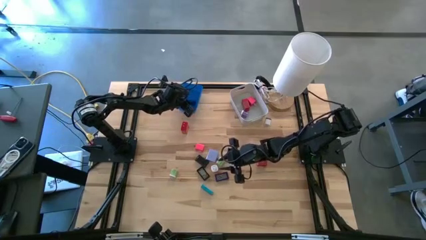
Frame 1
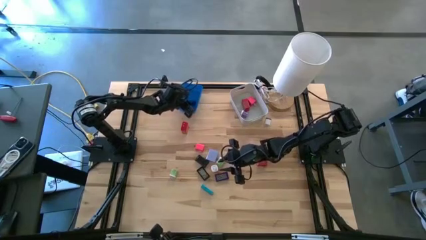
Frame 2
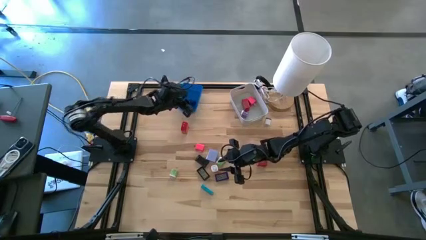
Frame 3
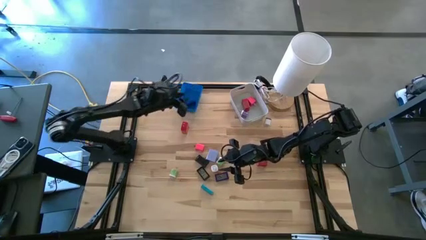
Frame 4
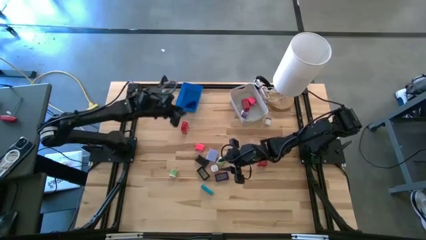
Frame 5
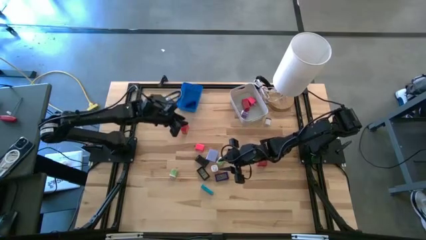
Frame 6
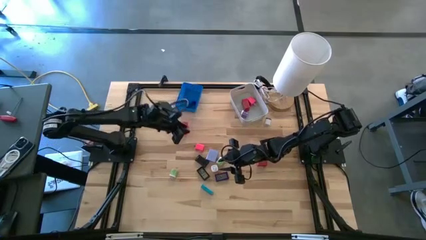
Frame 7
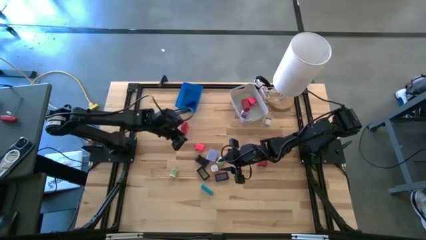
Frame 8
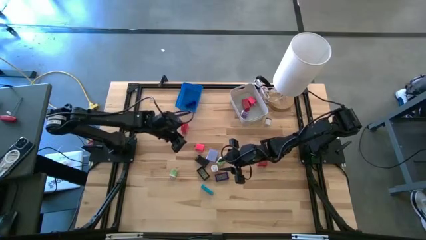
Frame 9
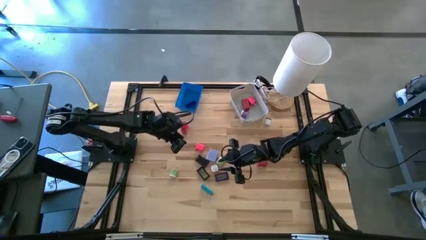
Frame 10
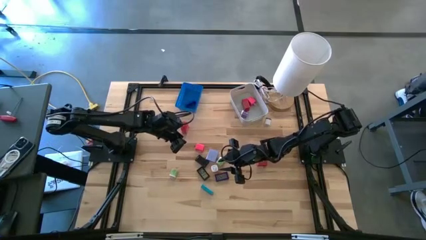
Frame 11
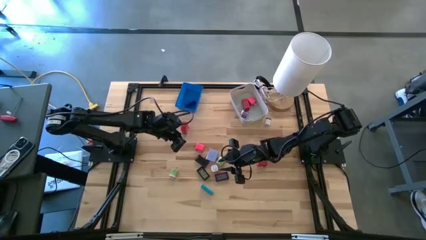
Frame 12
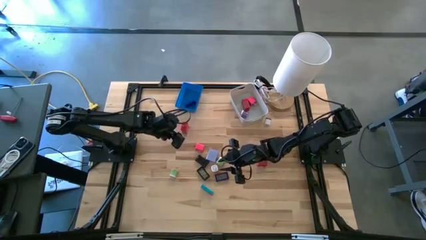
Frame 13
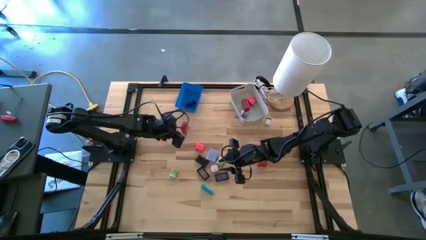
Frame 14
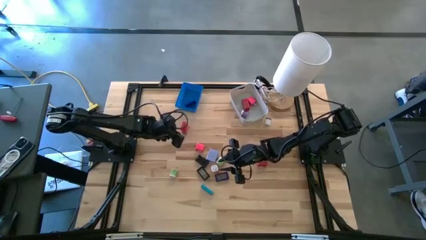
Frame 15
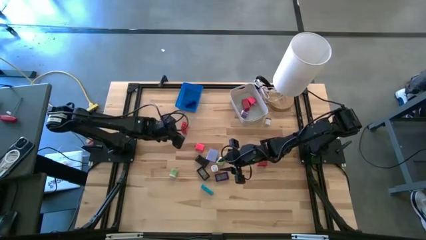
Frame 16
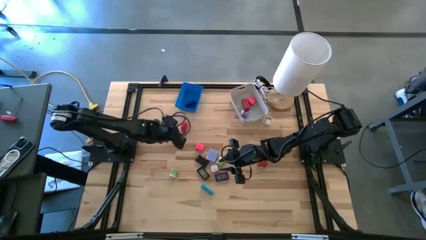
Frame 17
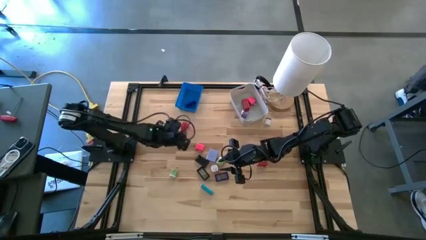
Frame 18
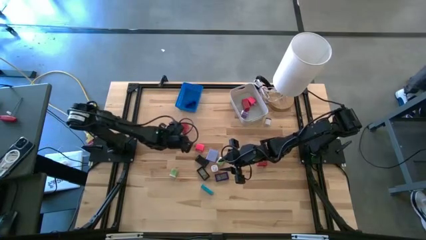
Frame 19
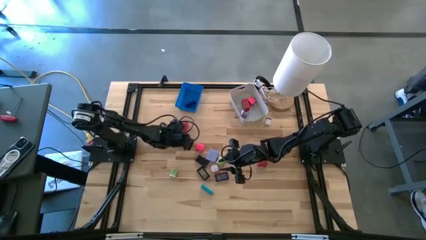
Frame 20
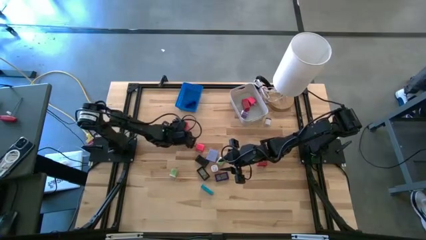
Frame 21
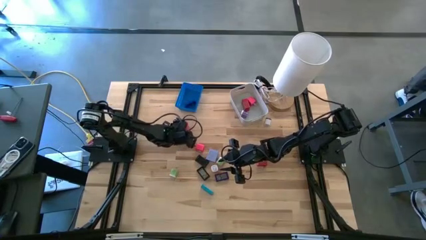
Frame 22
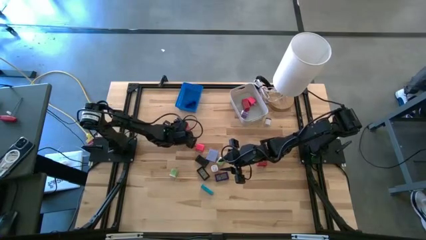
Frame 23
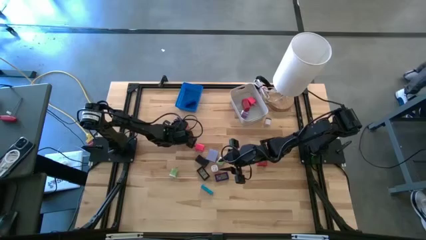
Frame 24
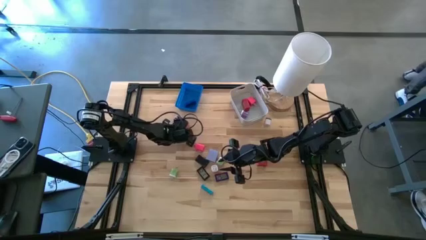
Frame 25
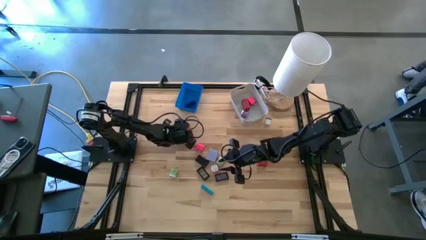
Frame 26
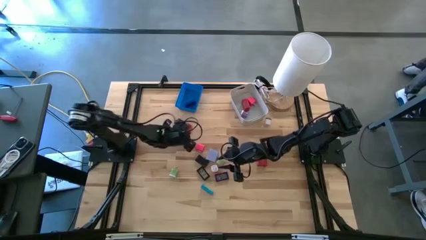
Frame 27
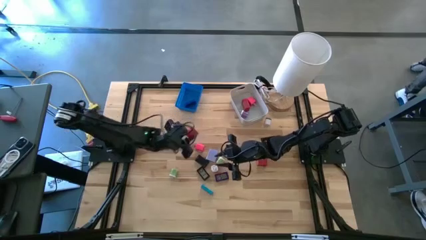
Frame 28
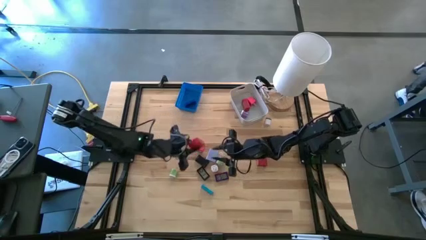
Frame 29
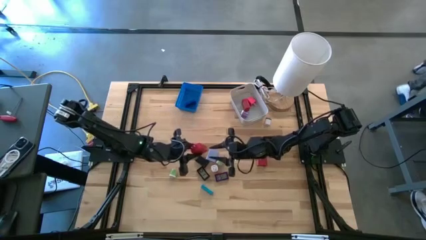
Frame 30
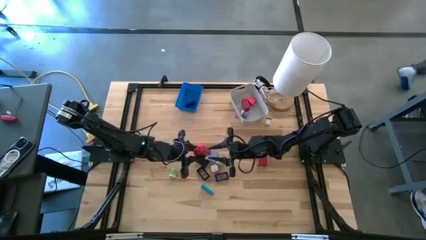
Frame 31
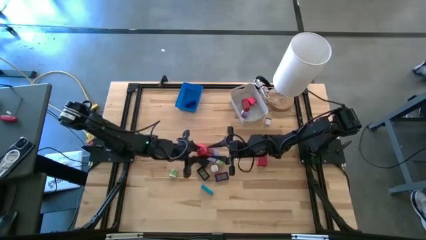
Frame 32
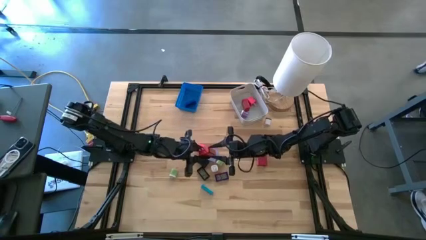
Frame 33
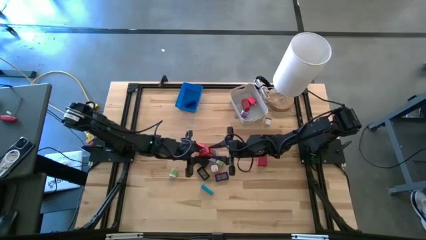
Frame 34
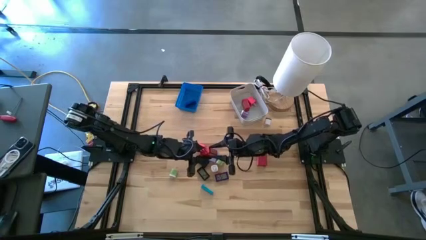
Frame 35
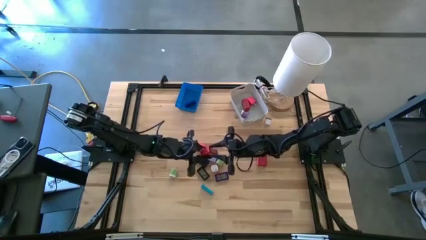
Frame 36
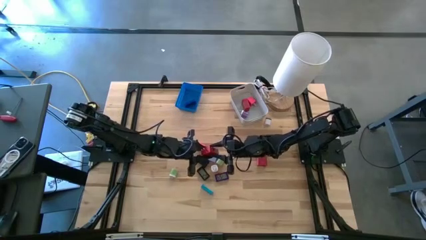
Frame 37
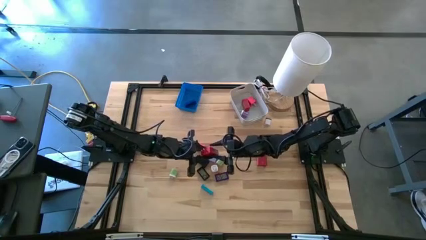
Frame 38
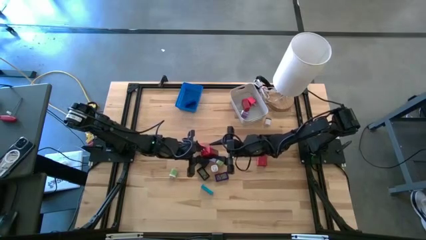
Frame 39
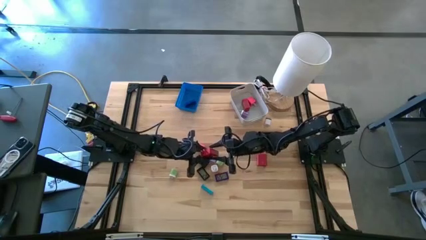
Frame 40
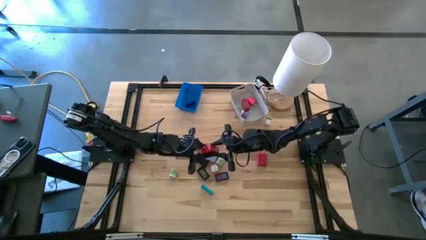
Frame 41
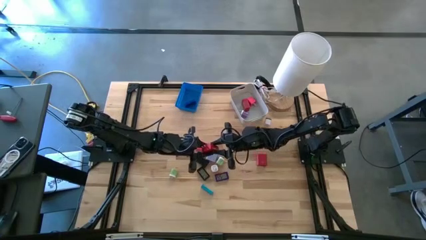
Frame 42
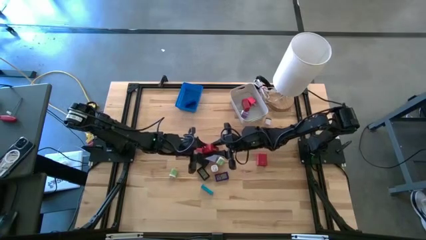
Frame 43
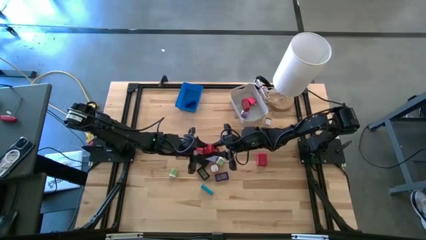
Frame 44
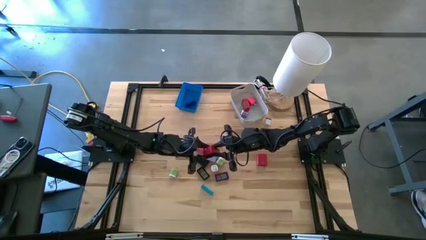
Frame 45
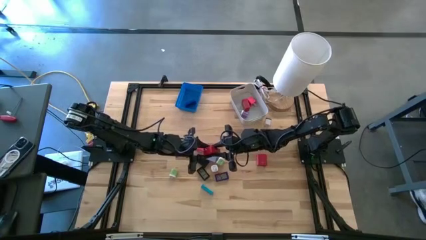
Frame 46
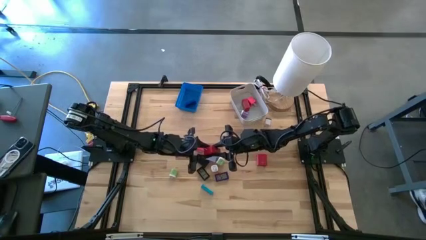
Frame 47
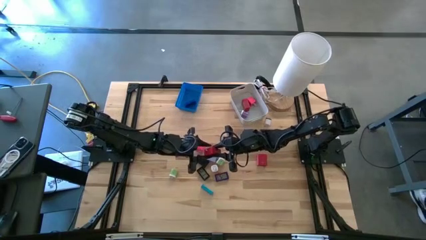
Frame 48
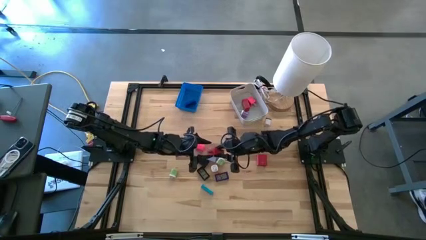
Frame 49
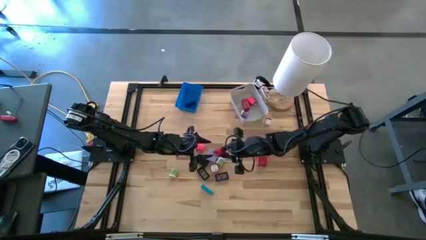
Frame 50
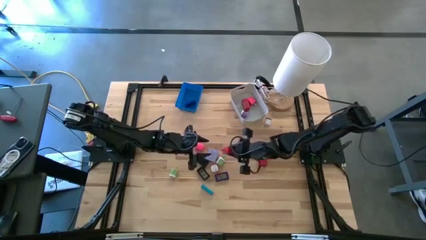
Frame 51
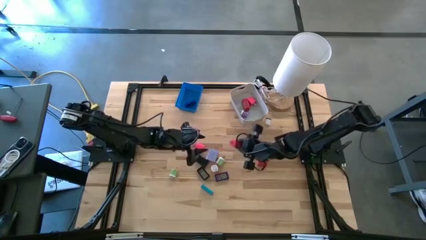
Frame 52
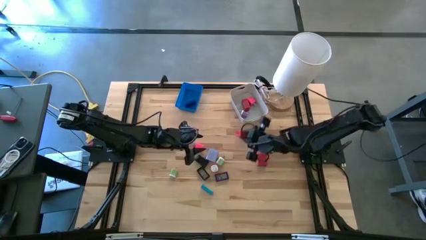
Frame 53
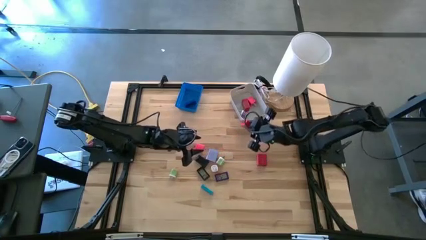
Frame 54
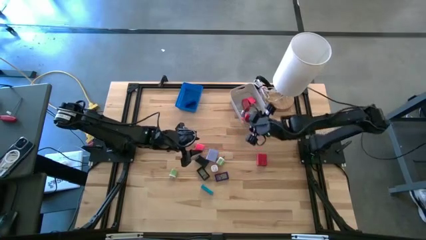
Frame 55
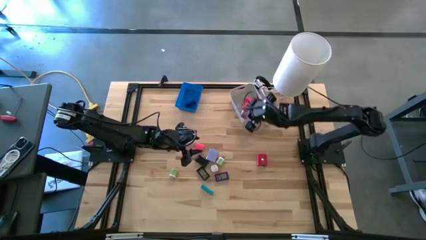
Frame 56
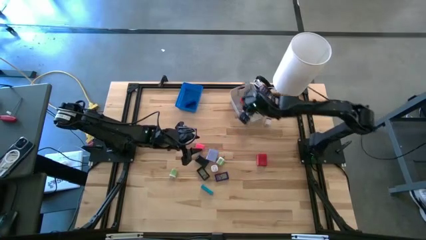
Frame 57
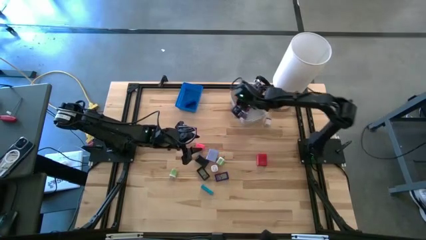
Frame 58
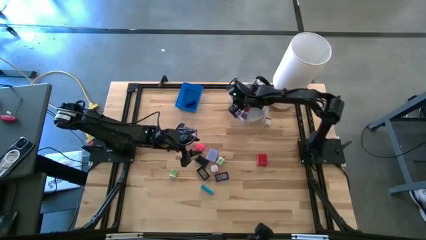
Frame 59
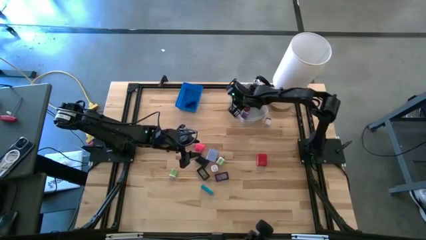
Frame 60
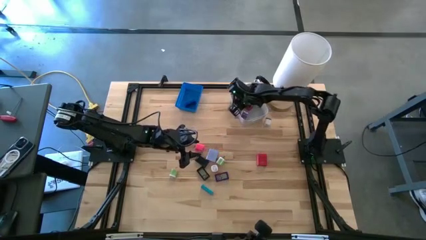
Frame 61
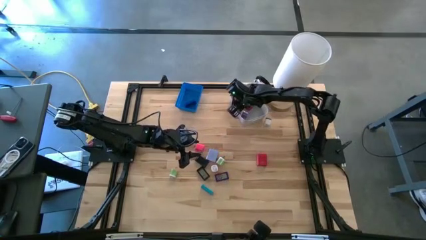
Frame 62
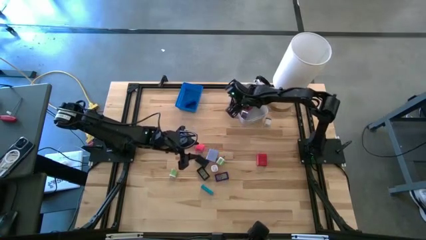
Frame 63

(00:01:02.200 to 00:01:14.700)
Task: Pick & Place Office items
Put the left red charger adapter into the white bin
